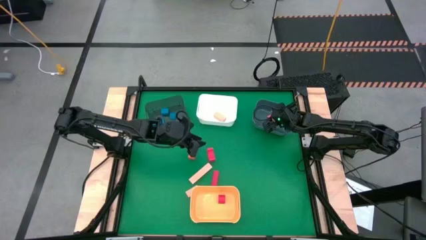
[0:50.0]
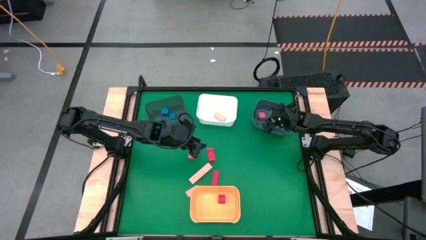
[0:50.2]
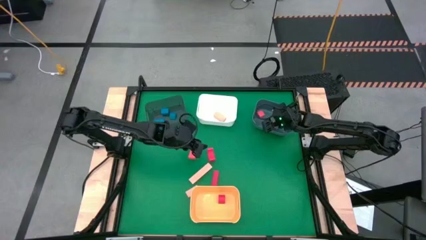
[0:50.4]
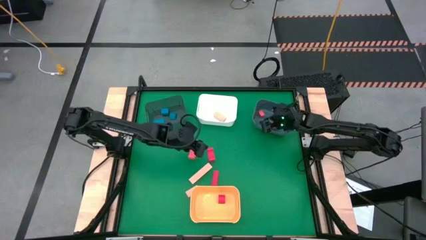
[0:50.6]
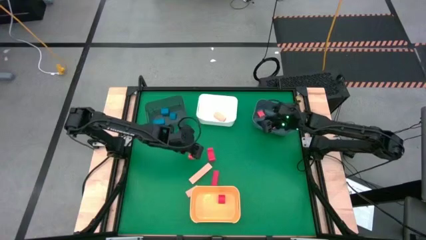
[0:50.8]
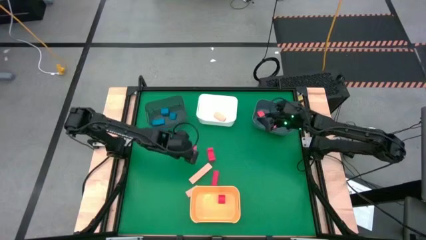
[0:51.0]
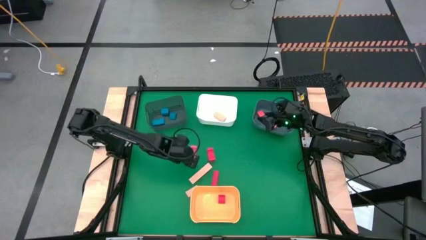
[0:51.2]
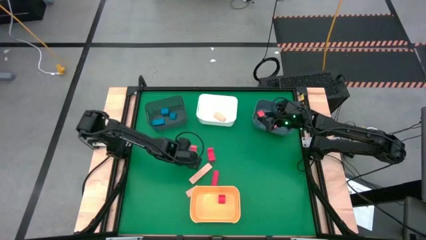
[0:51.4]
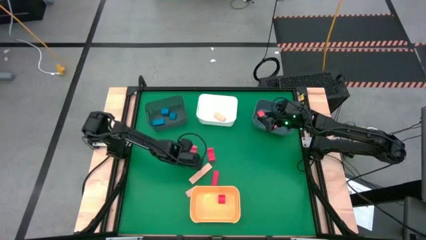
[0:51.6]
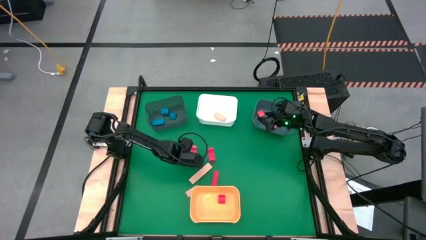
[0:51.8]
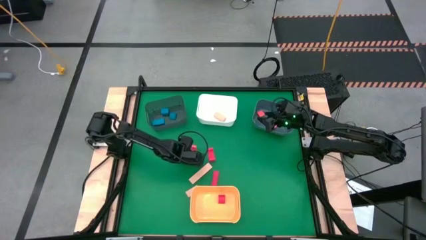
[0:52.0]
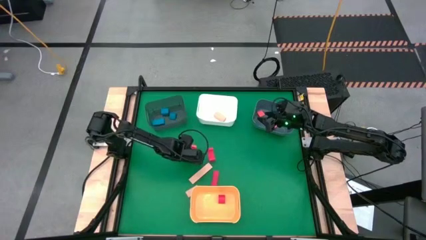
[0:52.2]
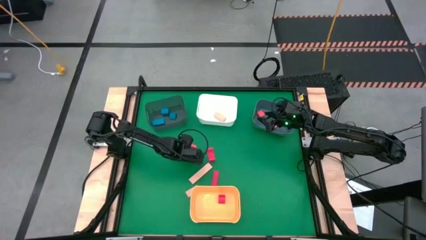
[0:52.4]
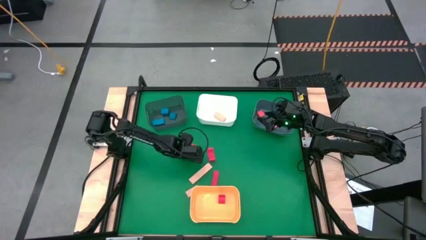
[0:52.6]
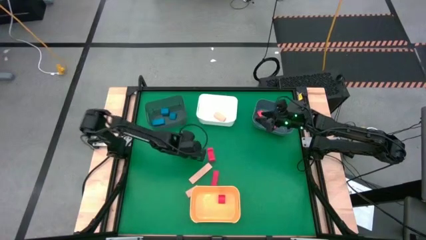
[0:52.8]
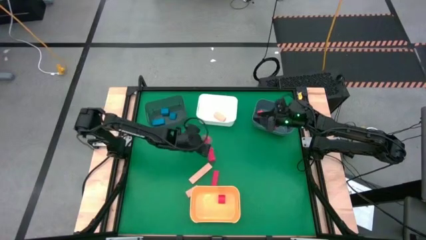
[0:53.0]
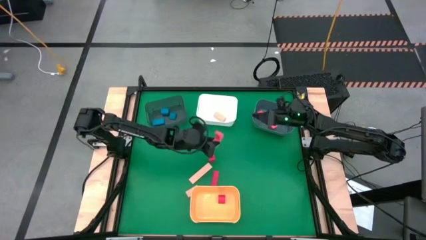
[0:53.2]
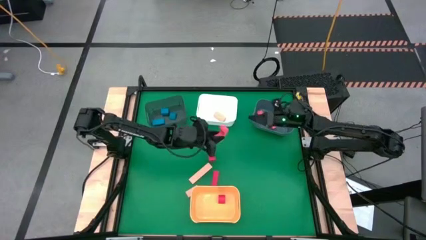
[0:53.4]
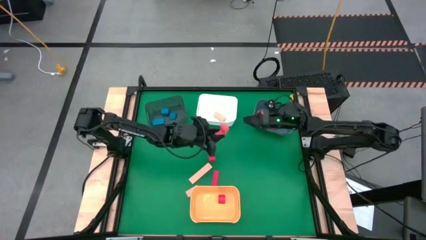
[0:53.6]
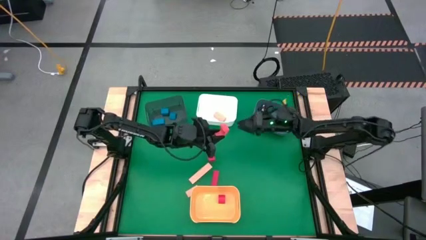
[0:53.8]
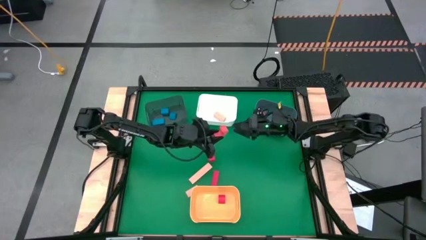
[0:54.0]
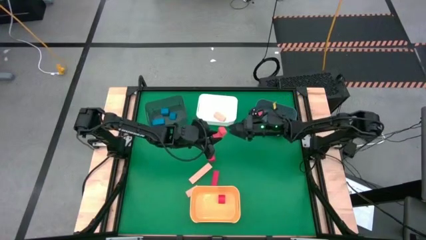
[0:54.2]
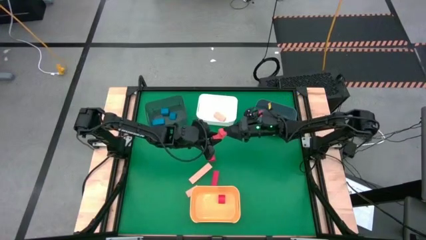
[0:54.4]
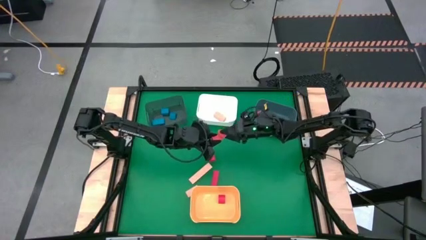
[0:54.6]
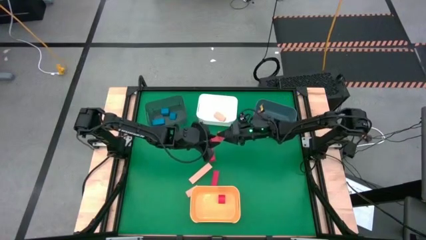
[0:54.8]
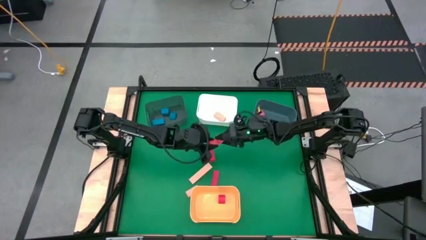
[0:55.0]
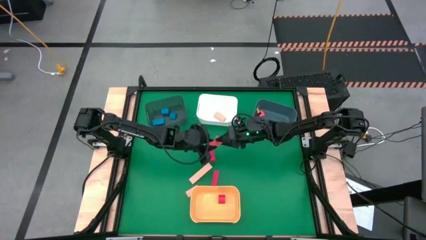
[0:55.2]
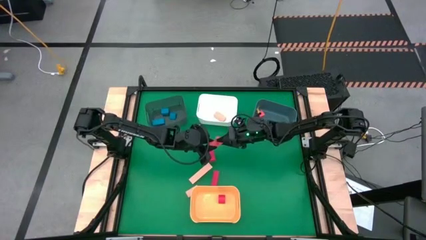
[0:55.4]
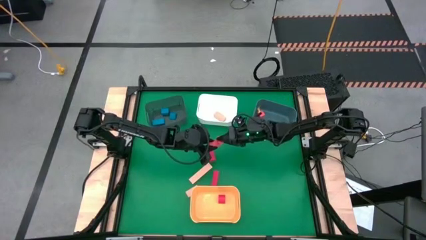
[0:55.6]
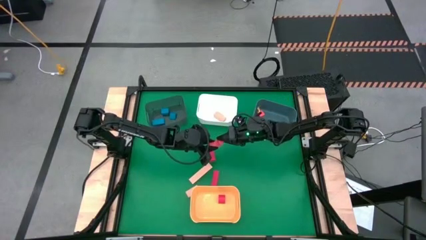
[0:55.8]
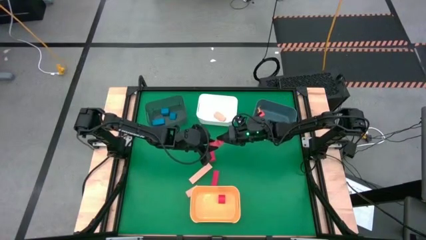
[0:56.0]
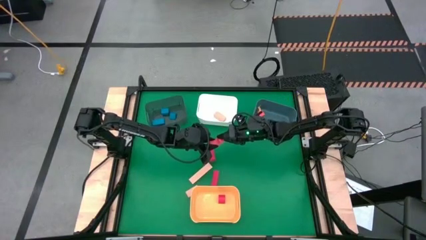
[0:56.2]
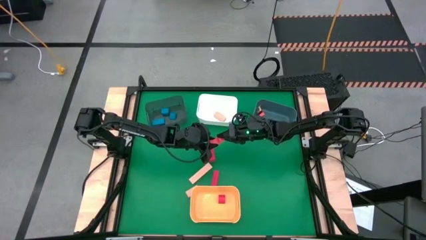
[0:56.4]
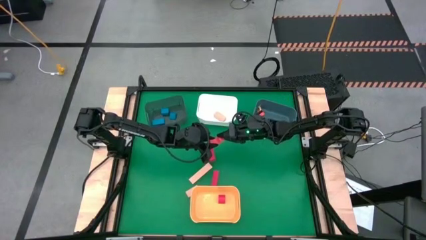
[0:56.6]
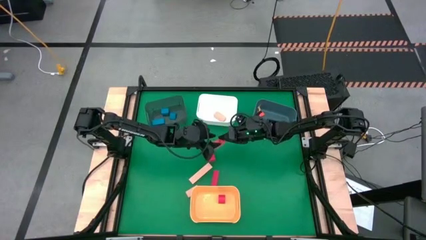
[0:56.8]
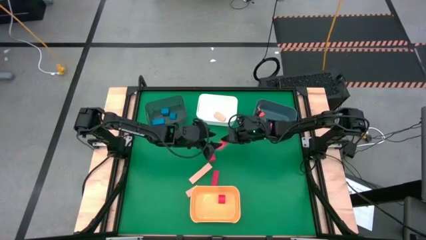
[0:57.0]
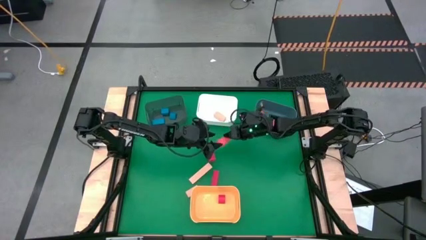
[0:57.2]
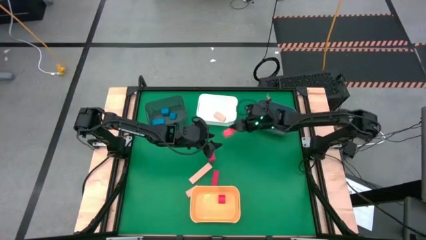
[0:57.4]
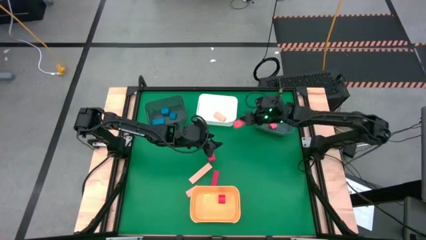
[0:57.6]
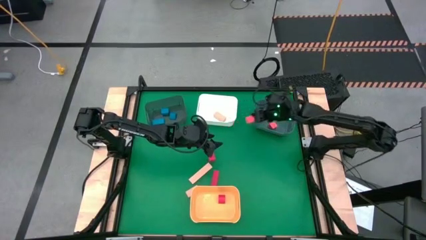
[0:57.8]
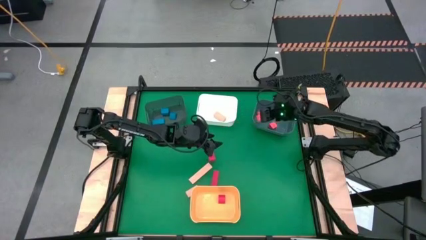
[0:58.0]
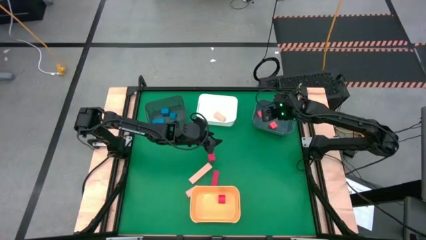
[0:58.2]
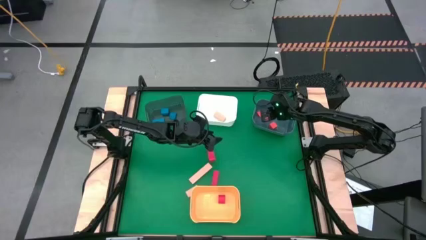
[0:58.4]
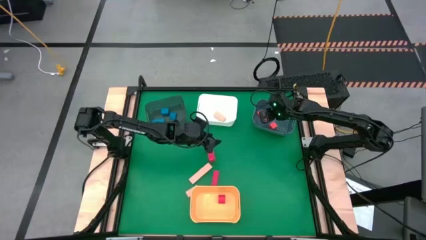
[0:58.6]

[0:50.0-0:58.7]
Task: Sort & place blocks by color
Put the orange block into the blue bin

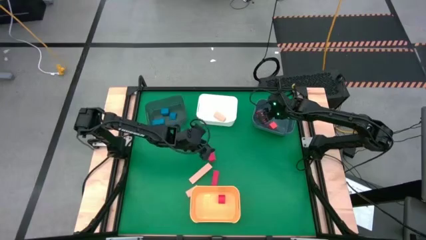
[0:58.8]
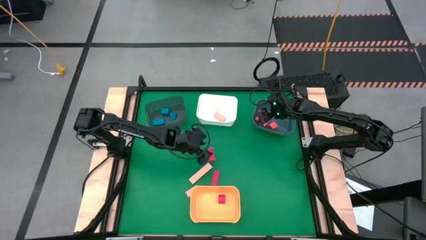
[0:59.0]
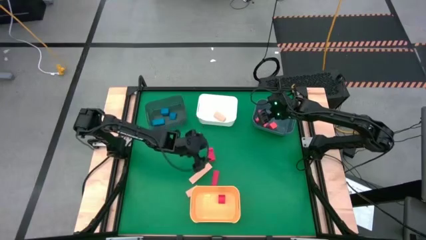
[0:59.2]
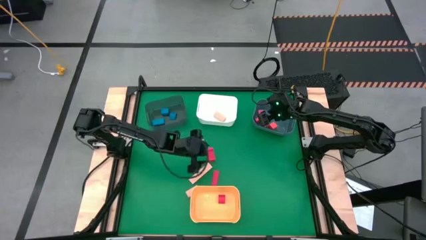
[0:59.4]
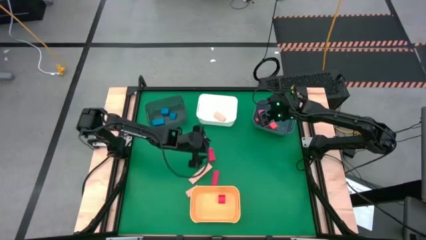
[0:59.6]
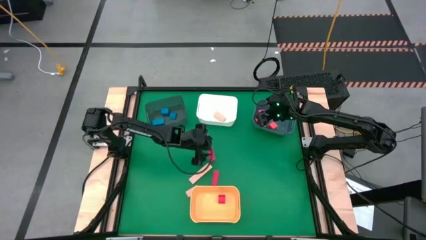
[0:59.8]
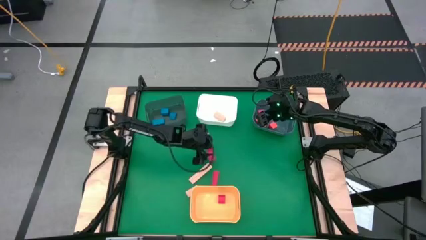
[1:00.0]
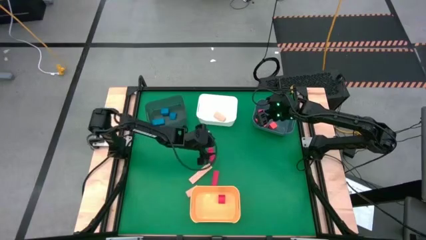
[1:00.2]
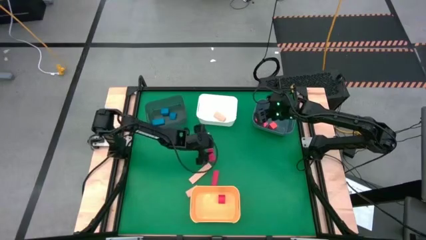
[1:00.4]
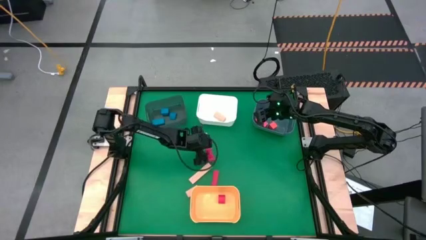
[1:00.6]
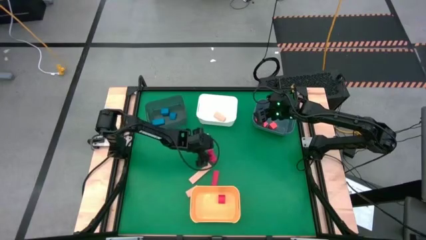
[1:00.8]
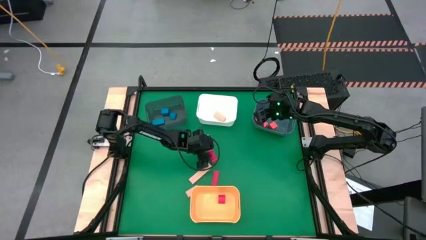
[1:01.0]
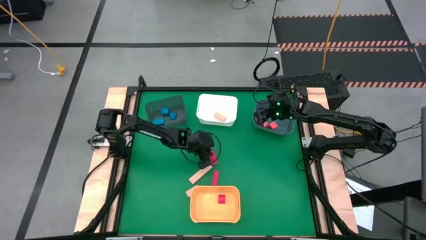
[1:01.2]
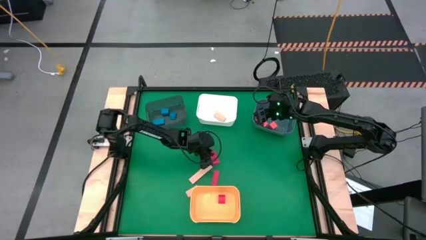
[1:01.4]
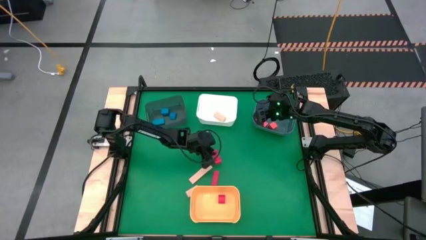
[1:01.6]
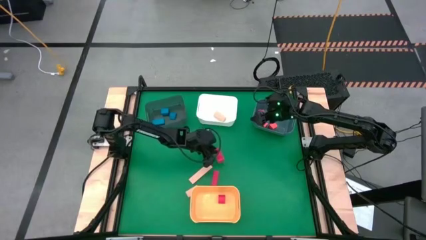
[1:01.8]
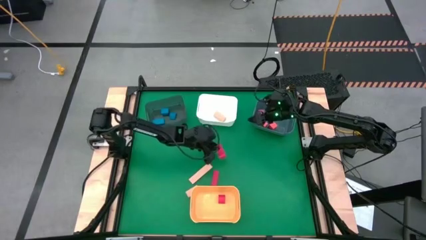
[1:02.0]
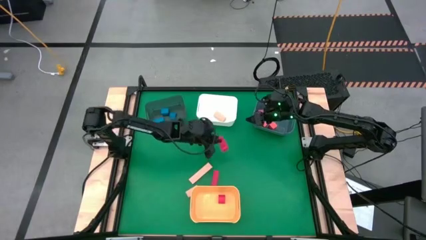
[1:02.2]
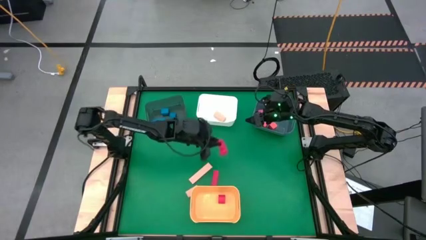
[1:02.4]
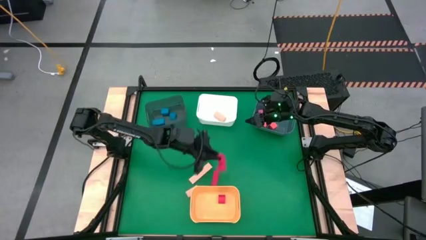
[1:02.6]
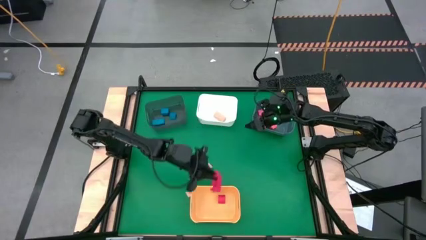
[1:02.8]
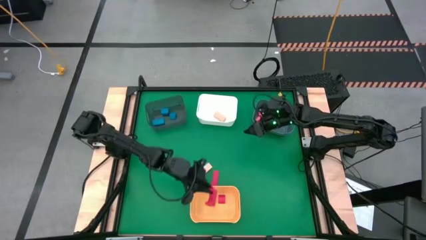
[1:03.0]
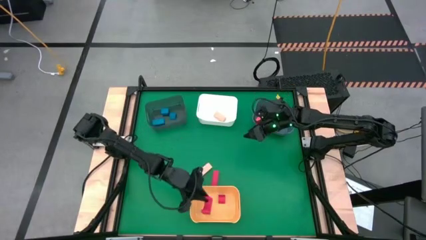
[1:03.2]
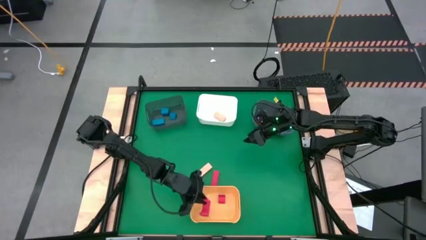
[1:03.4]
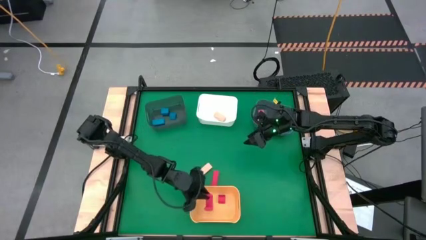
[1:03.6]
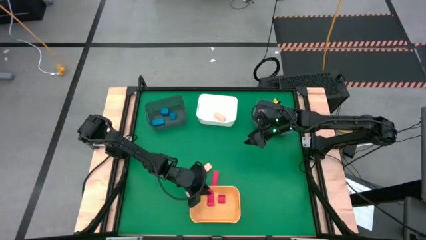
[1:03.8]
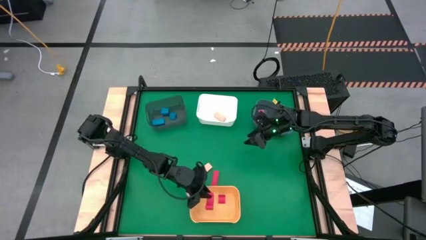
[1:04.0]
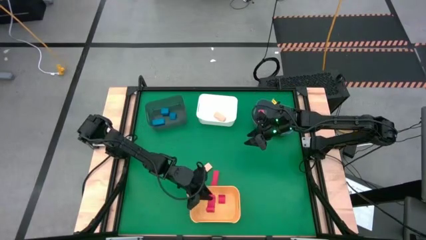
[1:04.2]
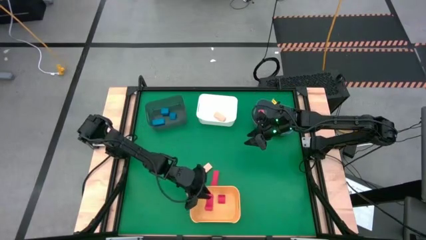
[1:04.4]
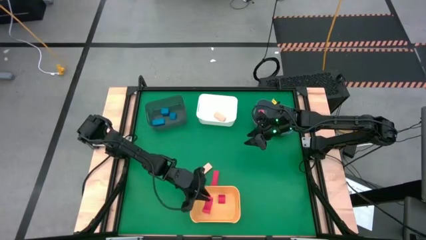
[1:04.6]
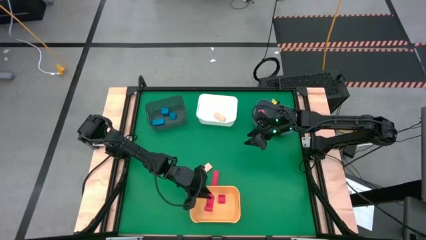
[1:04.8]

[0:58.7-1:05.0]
Put the red block into the yellow bin
